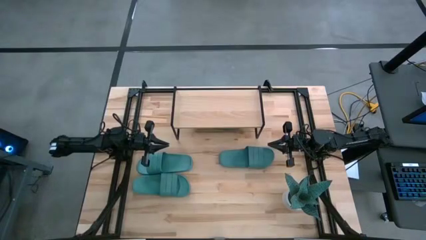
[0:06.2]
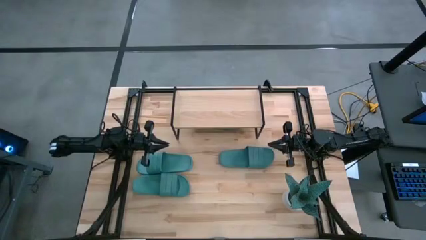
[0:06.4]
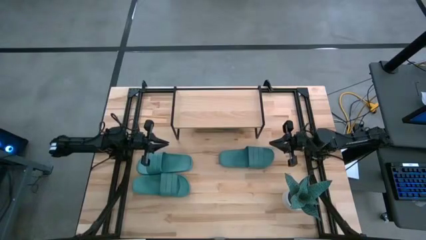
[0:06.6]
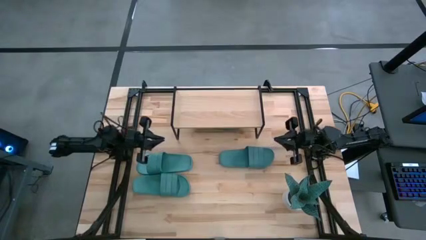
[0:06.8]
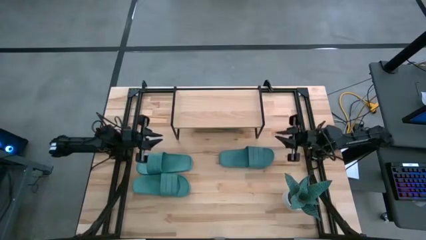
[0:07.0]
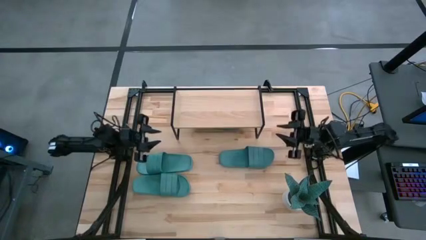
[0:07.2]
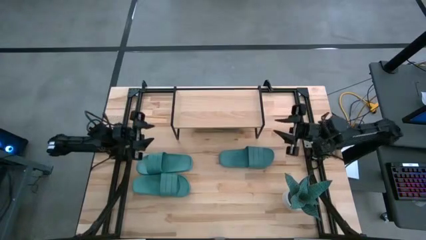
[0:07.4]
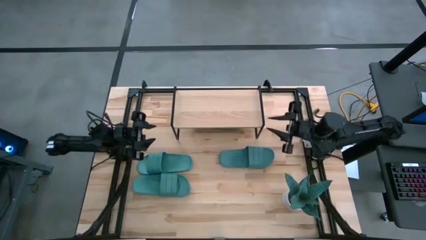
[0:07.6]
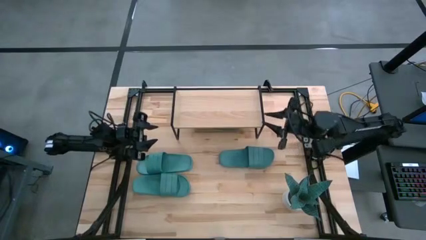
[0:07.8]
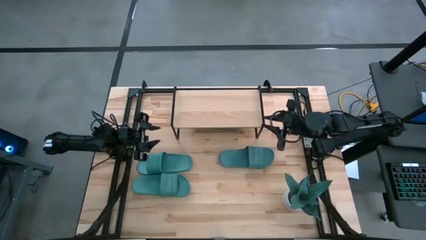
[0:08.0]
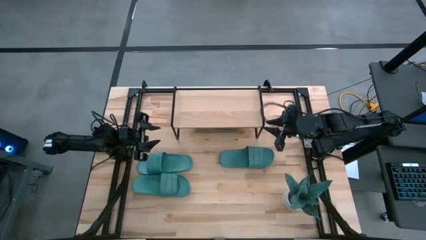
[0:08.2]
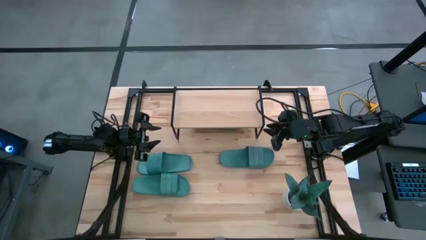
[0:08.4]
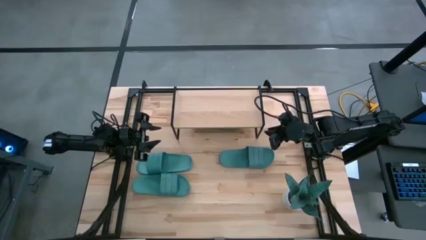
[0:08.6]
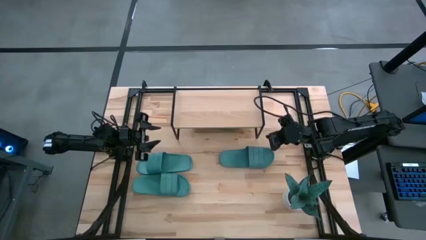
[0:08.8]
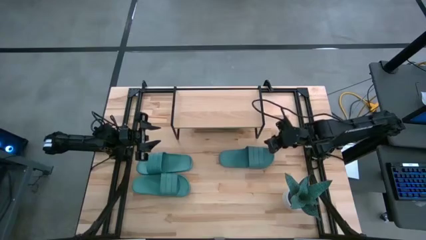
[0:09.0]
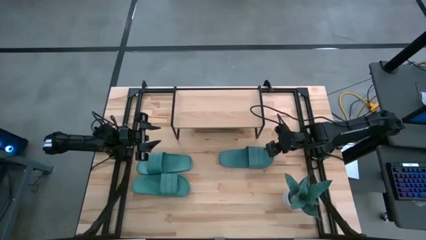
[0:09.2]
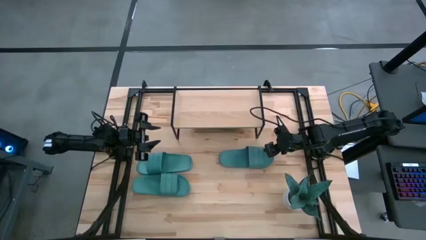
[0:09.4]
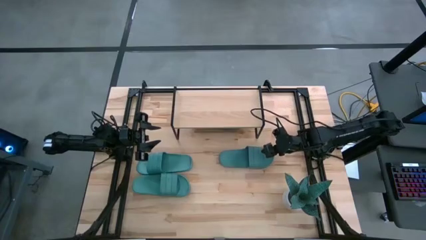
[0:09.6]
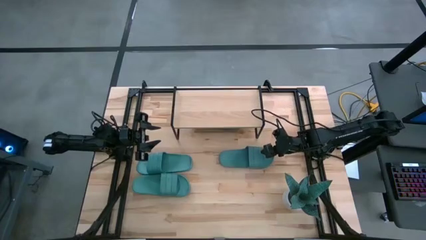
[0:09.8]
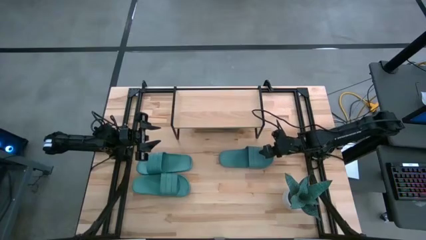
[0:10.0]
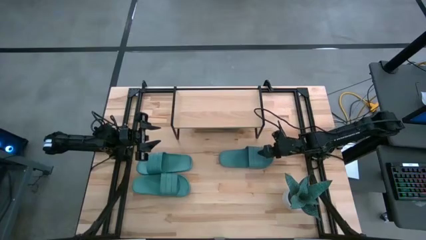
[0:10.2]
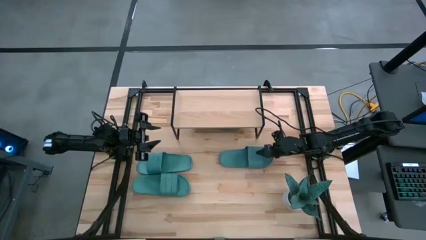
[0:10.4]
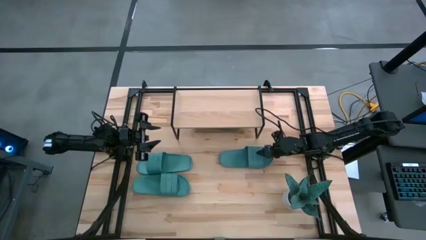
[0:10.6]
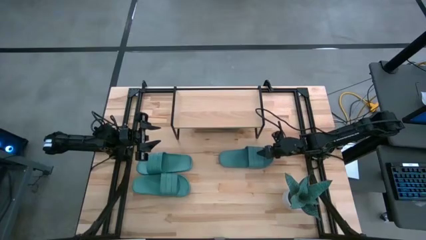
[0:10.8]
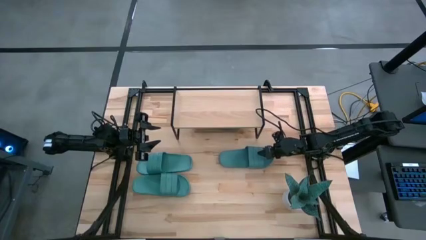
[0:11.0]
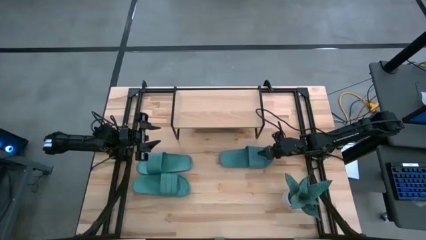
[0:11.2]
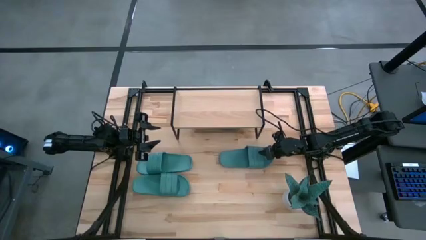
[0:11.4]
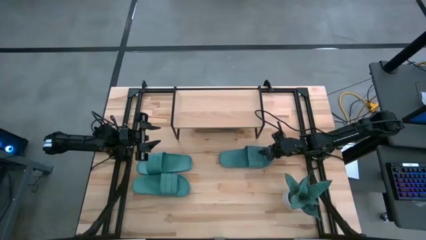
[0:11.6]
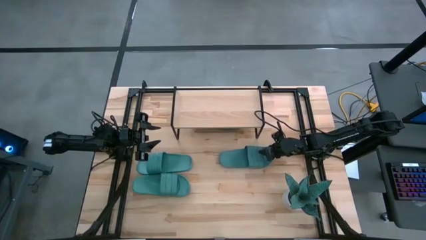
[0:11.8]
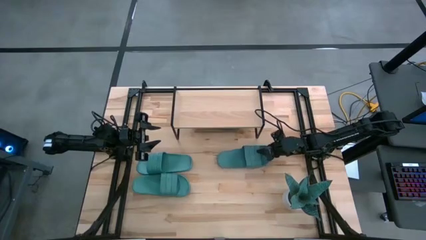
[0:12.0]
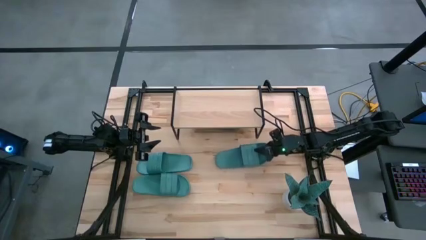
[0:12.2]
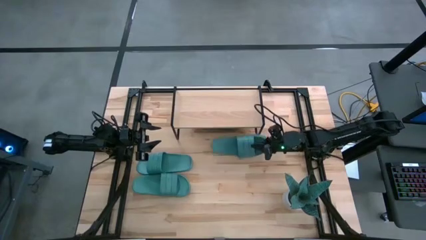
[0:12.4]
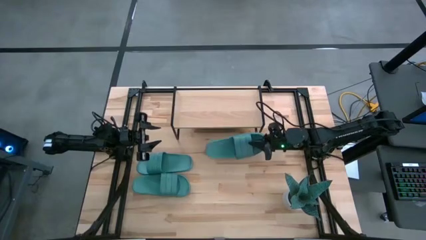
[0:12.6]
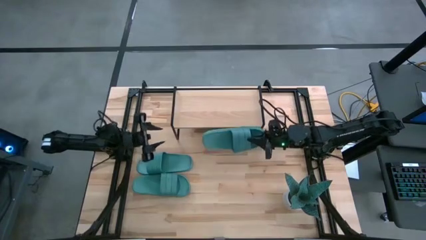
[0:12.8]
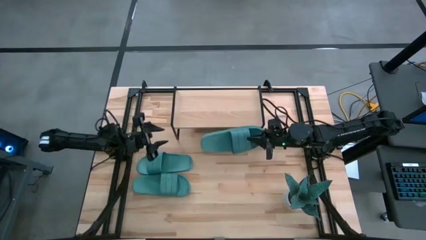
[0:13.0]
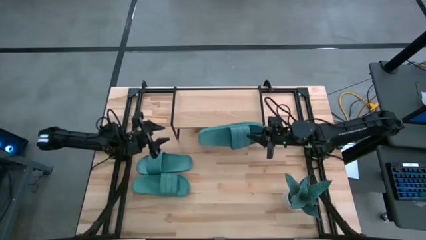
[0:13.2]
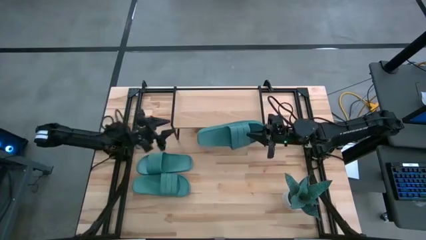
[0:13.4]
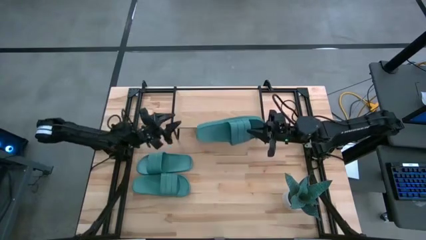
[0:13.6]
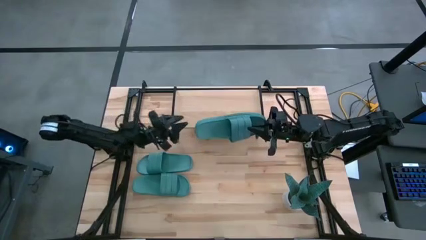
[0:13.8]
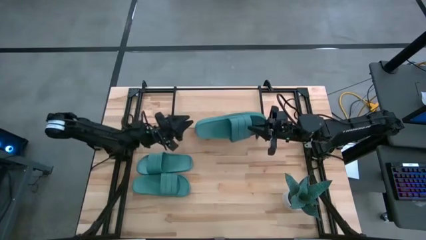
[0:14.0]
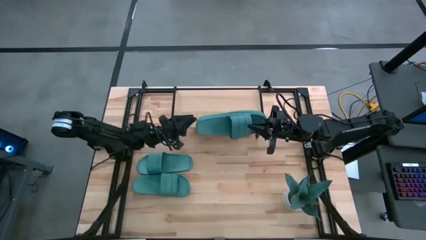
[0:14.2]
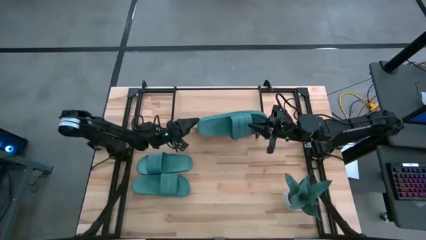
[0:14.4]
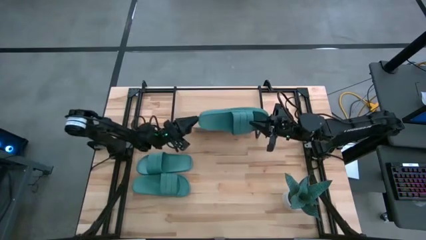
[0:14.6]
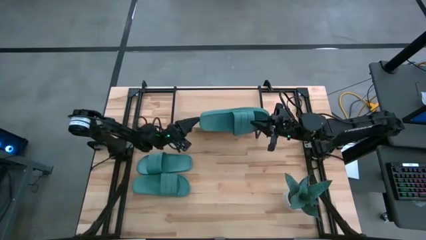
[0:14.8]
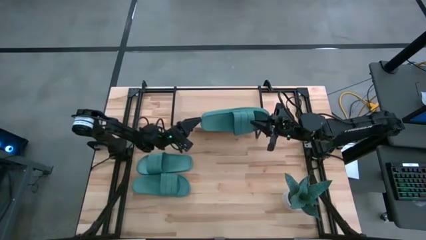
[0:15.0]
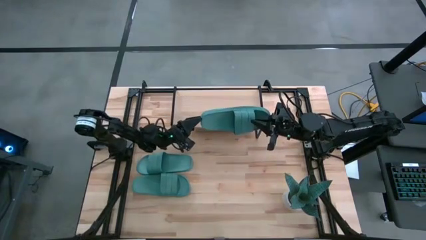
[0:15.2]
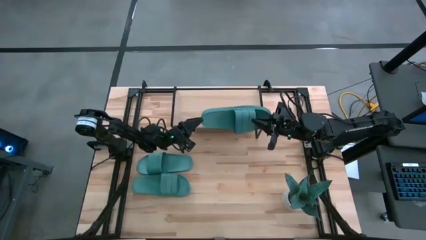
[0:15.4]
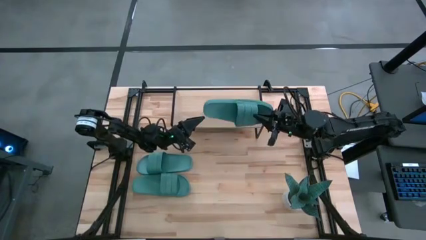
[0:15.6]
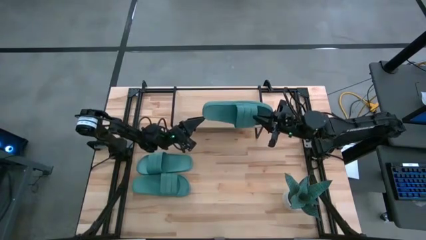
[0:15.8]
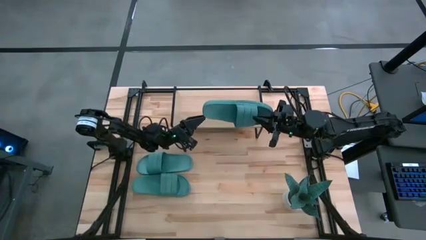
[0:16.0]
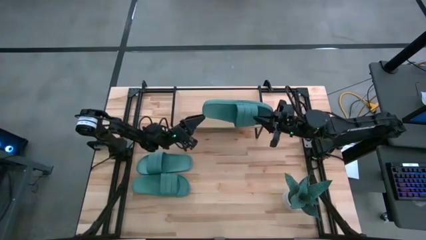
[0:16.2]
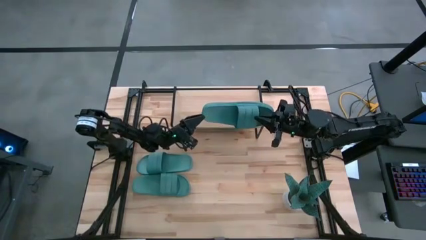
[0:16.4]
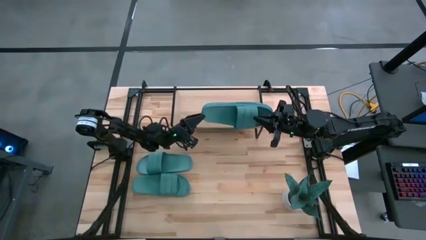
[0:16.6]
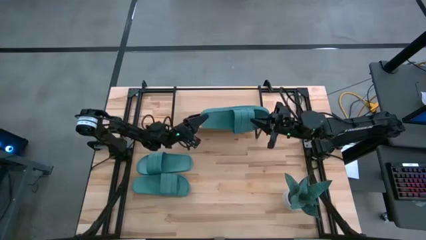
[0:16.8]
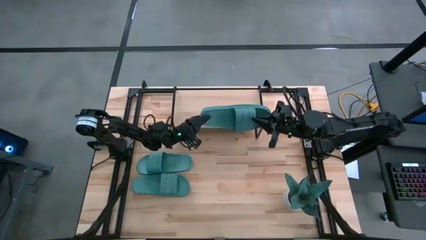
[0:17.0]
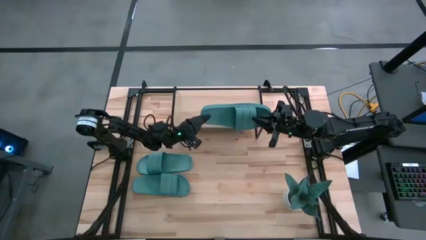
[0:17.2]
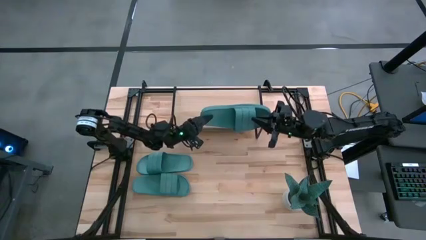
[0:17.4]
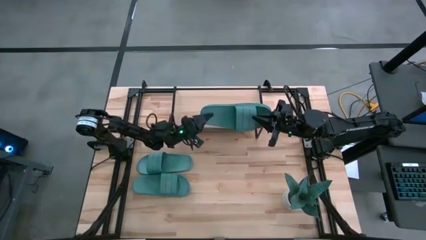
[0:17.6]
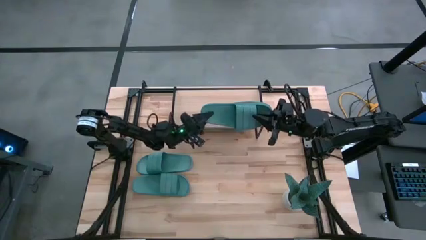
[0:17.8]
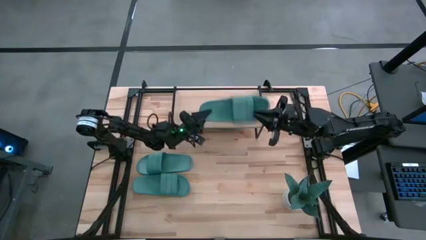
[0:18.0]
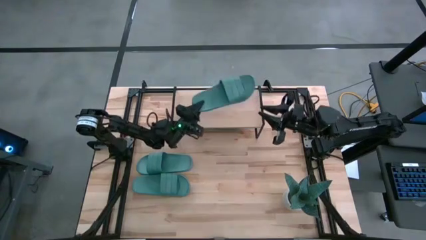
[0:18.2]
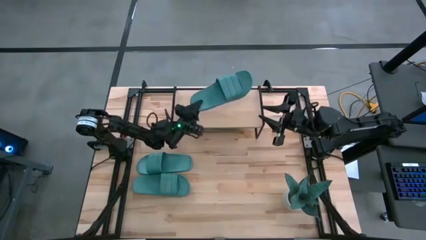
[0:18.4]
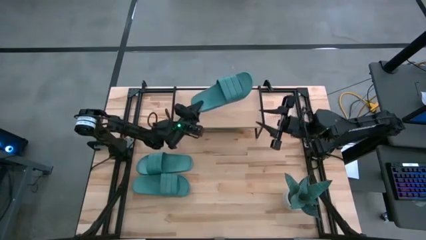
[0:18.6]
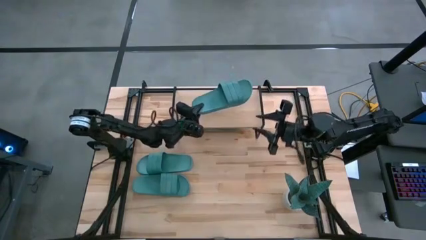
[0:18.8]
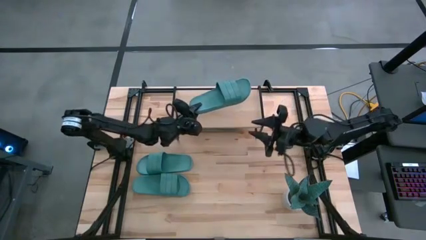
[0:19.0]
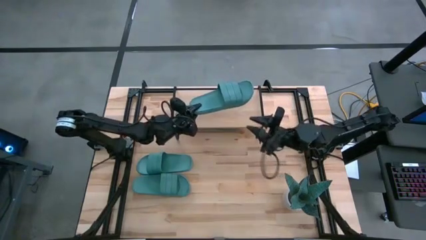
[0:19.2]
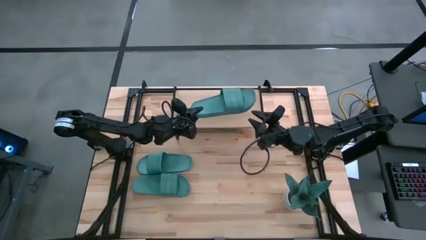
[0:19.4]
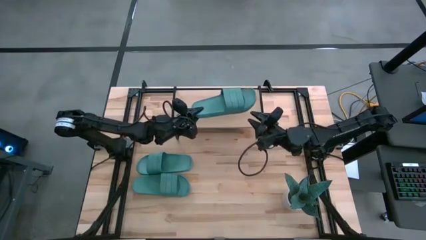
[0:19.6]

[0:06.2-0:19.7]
Task: Pick and place slides into the shelf
Put the green slides on the shelf
